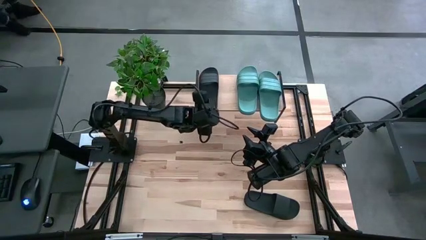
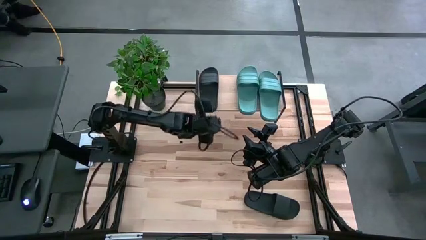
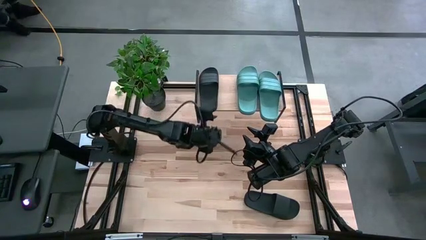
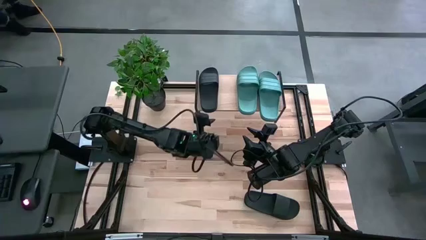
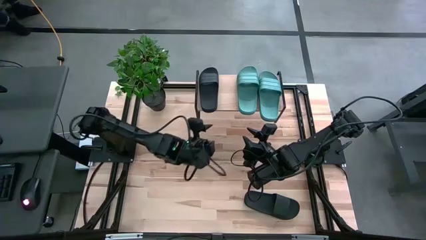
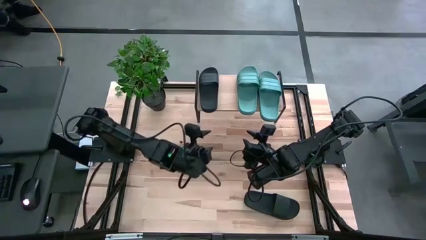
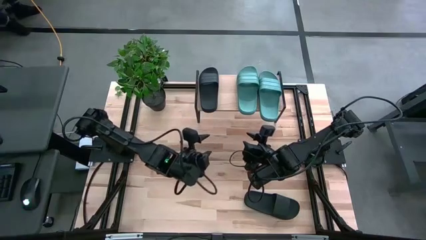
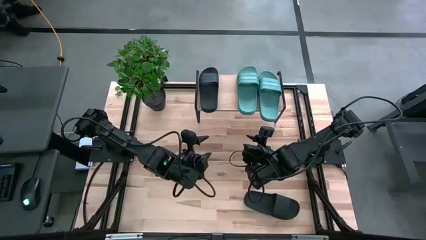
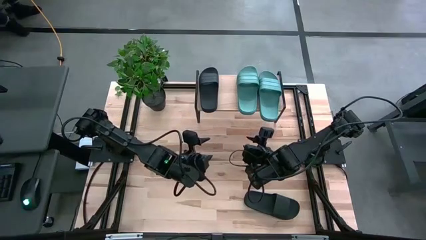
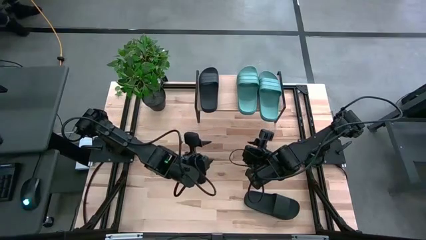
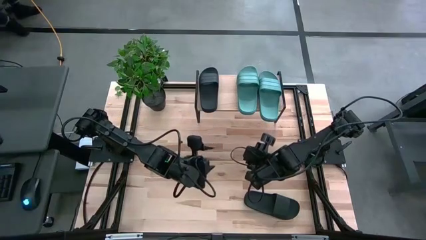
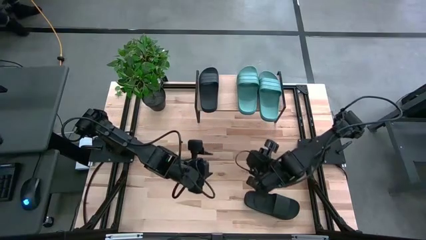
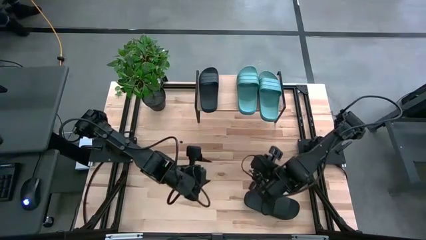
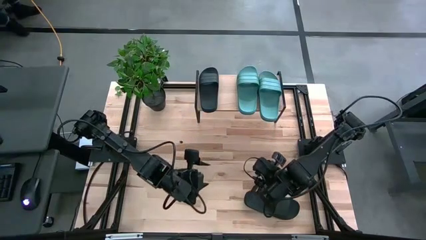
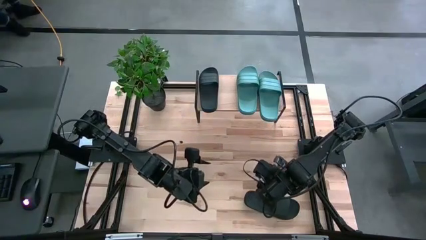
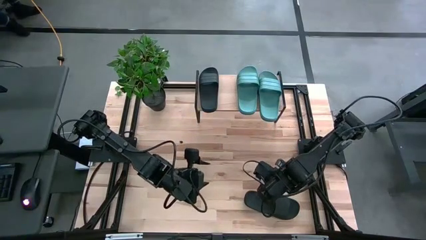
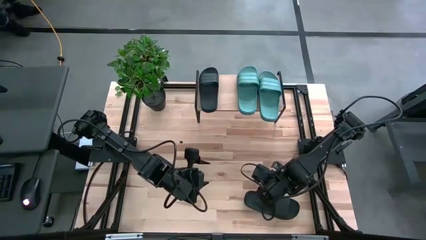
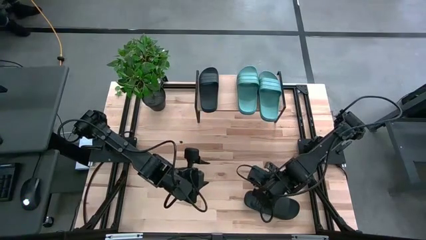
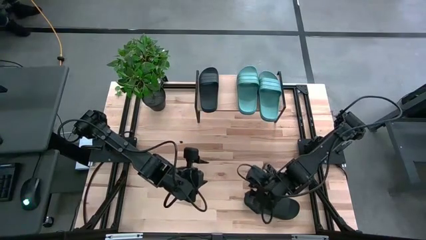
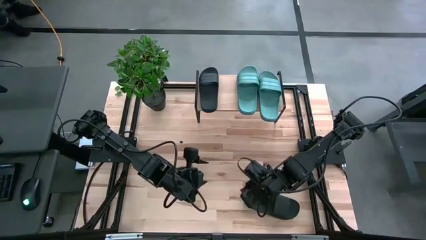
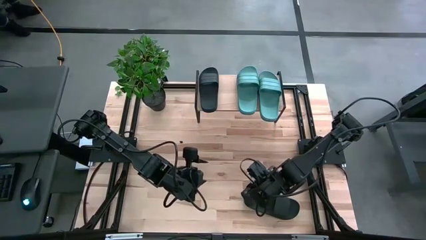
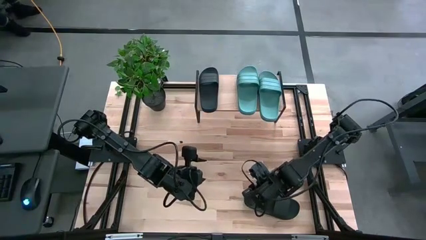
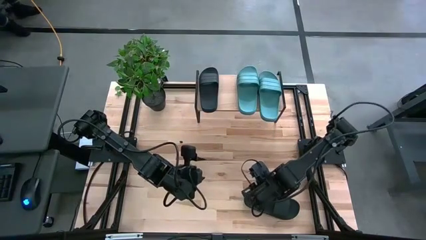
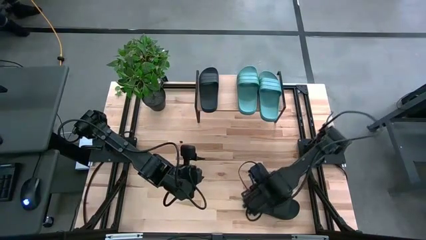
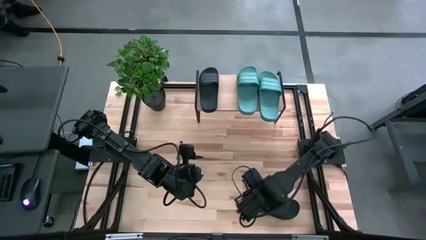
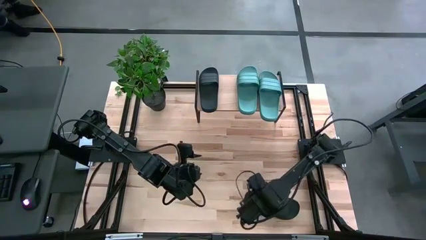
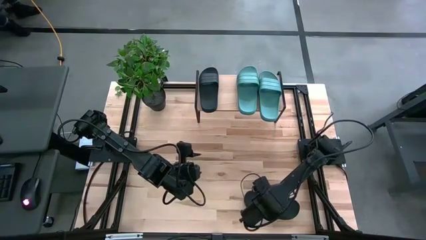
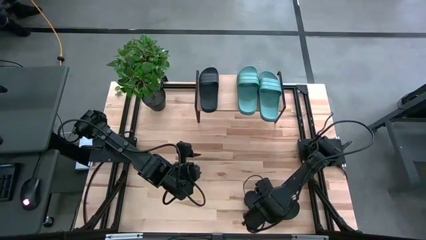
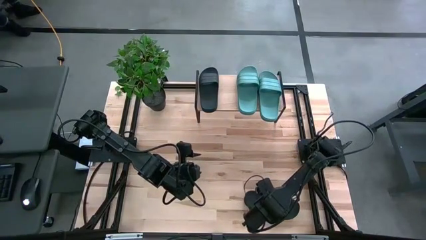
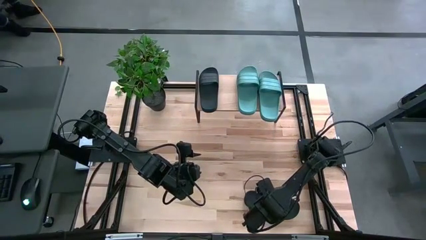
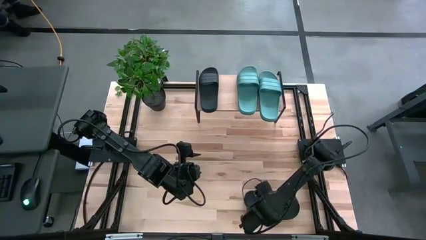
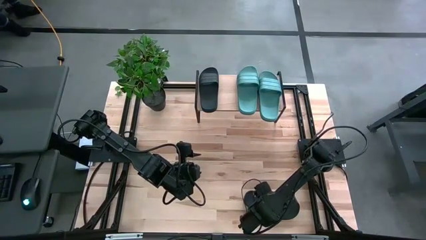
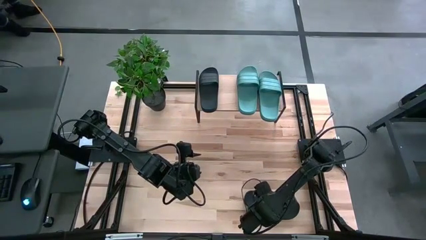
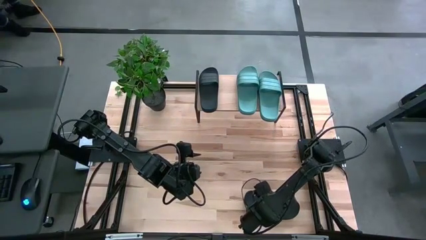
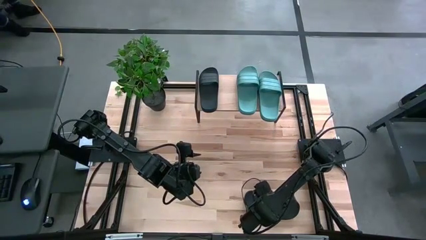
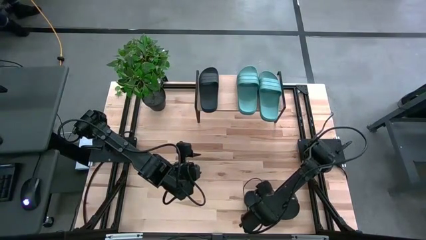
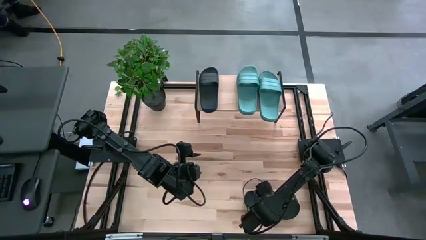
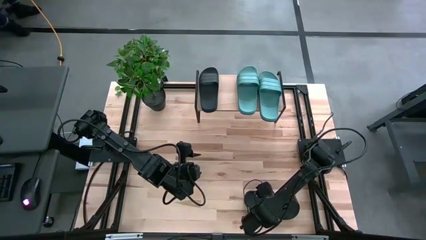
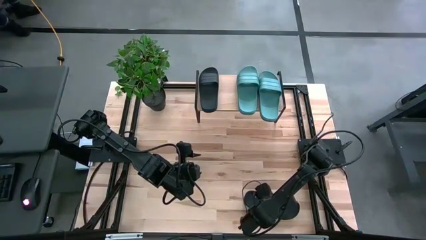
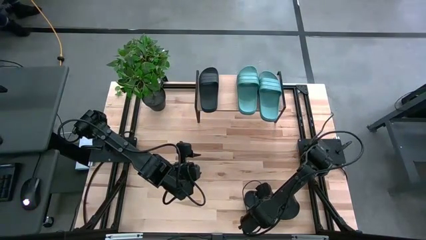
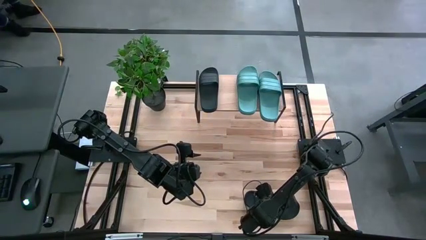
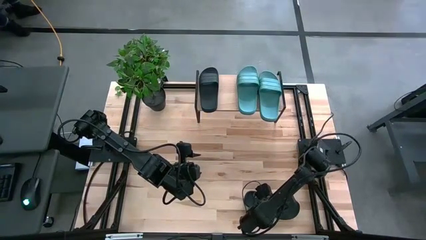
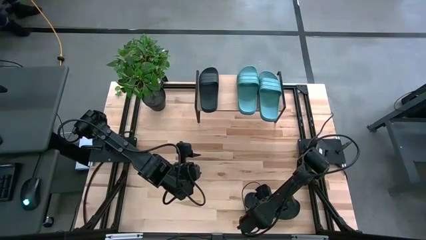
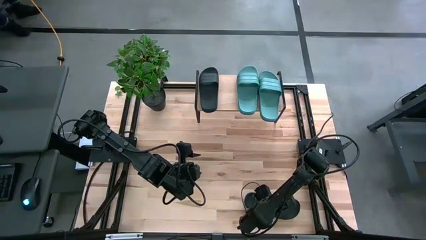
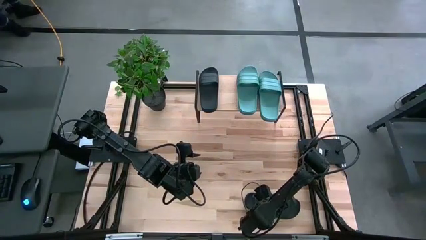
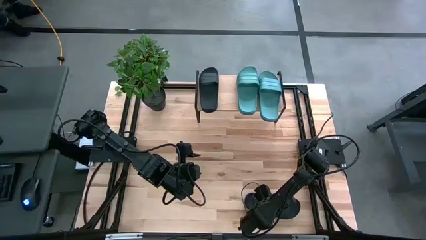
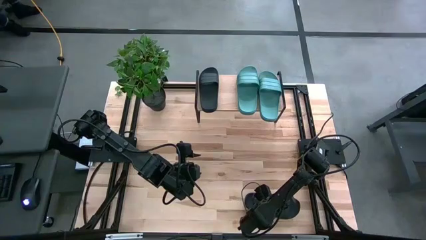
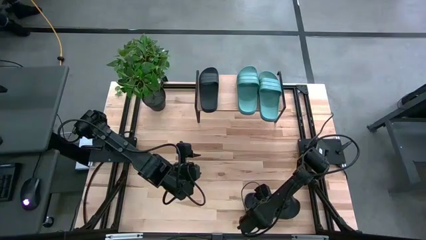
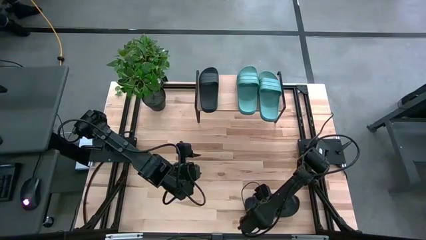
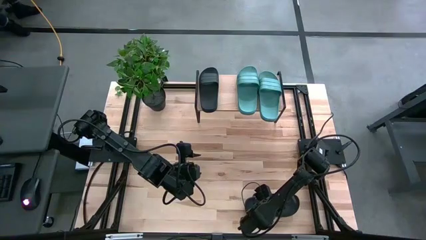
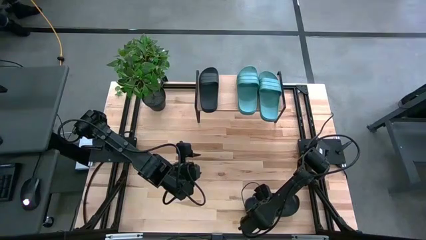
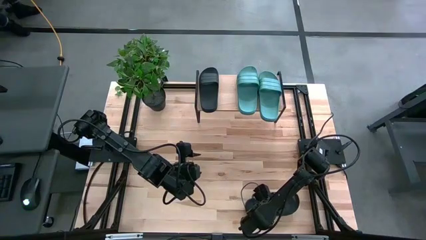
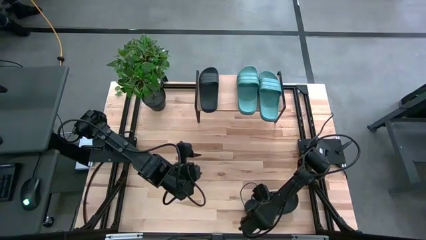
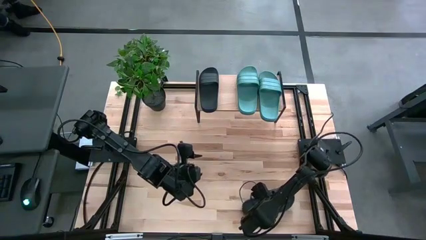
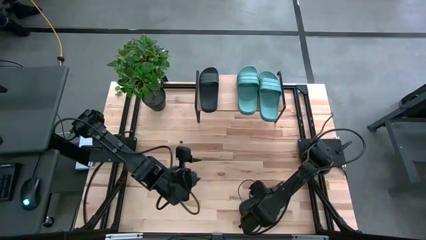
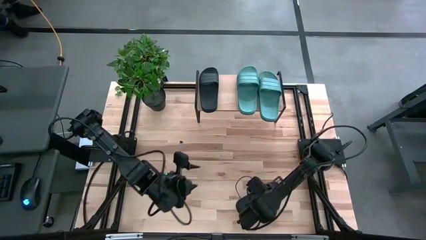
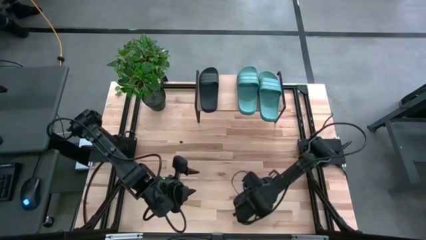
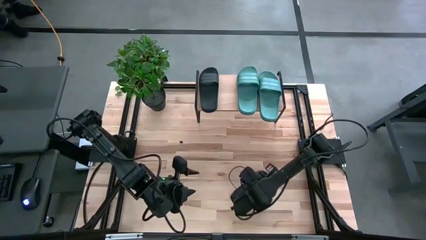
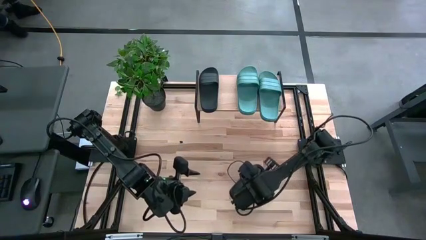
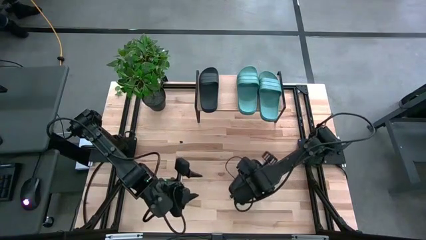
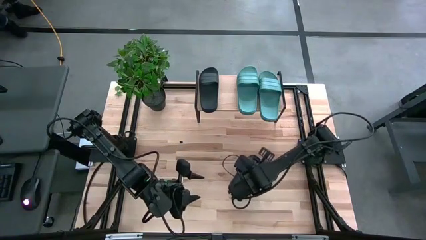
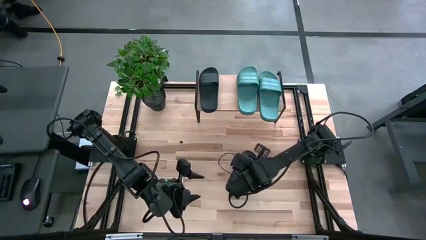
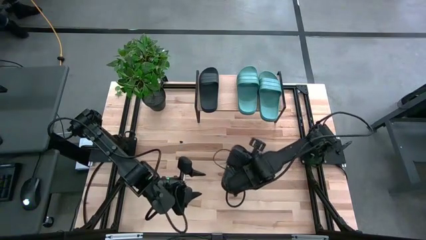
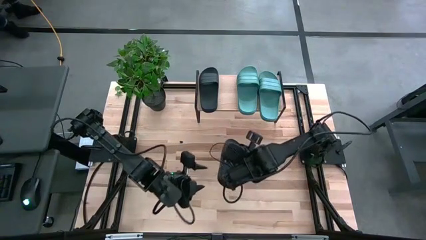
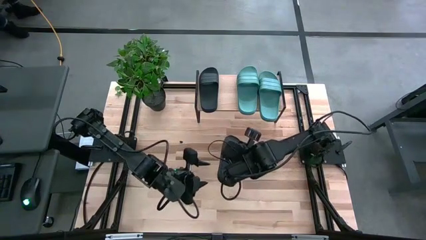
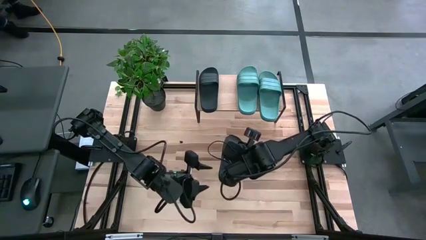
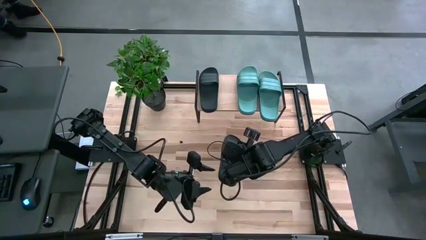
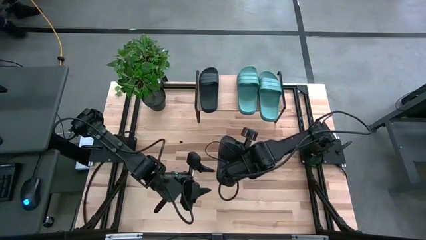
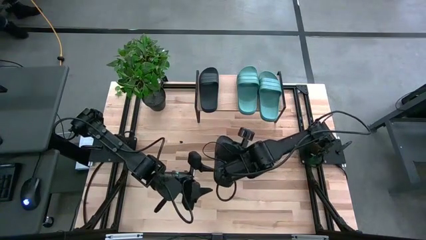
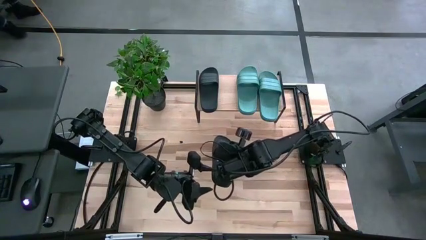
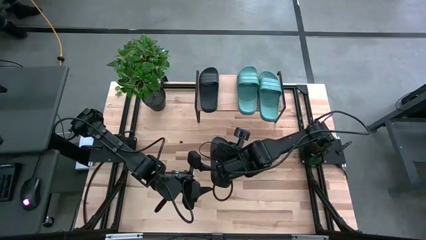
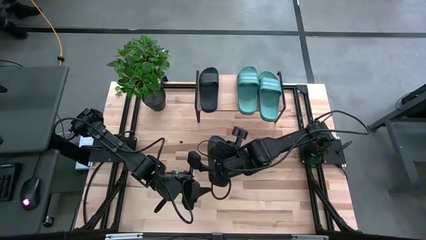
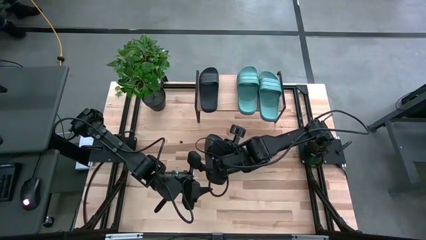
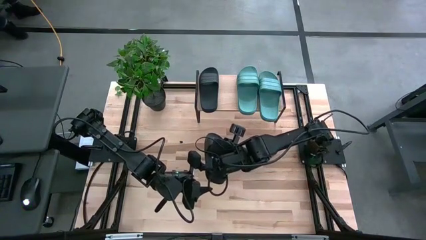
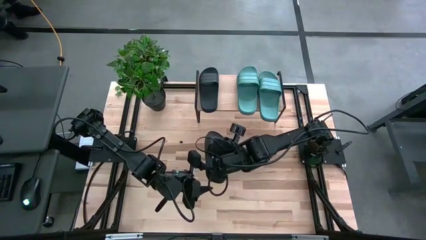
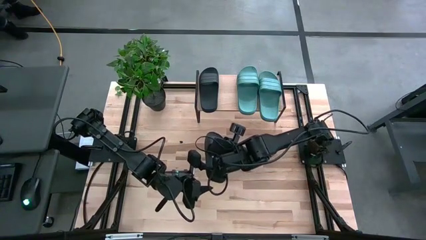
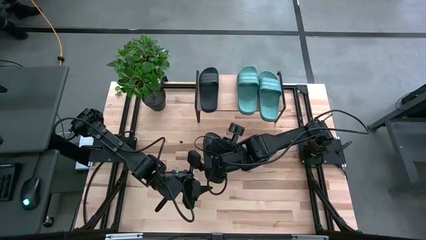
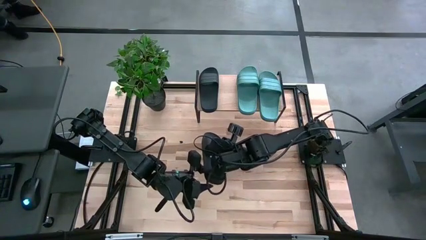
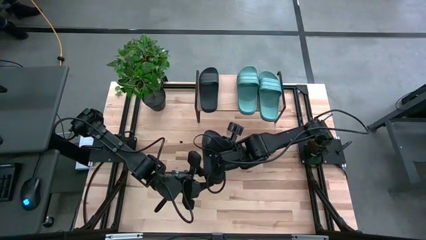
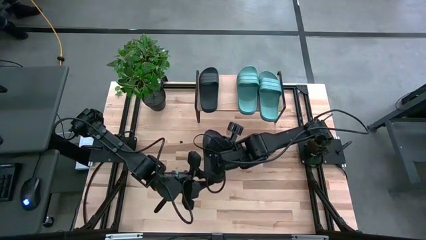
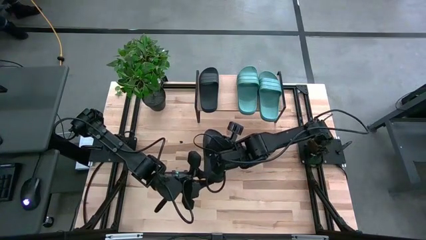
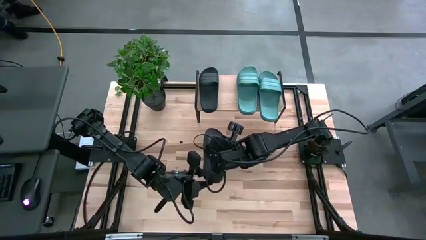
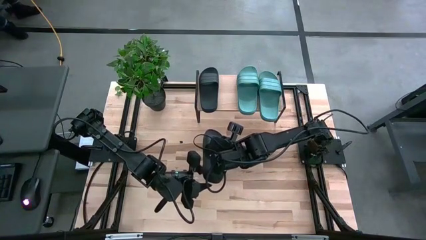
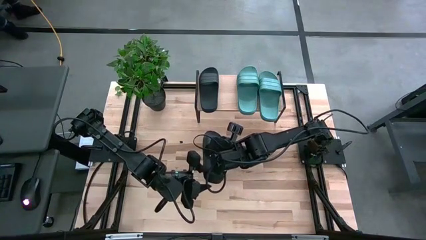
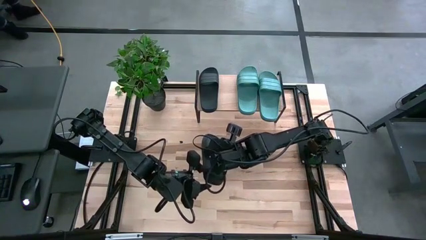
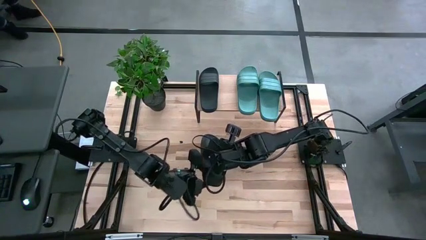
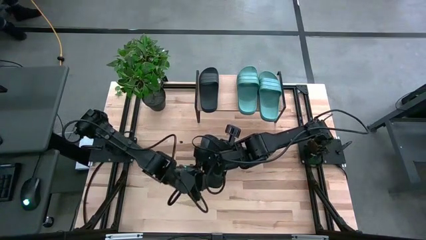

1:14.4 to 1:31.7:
Task: Pick and place slides into the shelf
Put the black slide on the shelf
